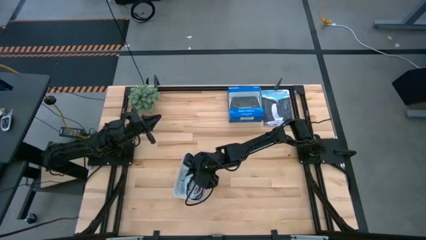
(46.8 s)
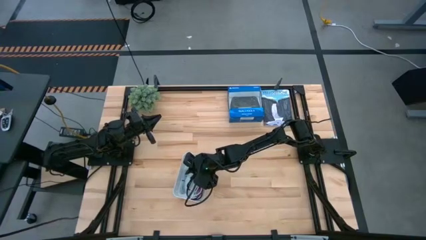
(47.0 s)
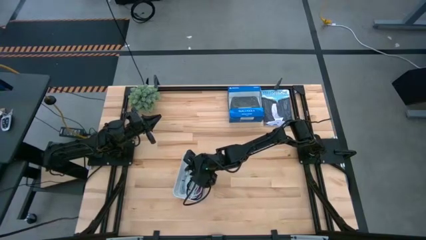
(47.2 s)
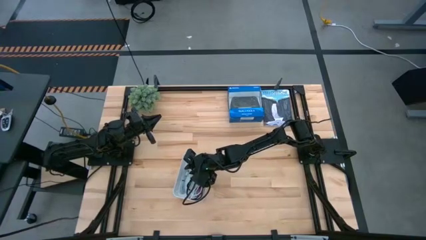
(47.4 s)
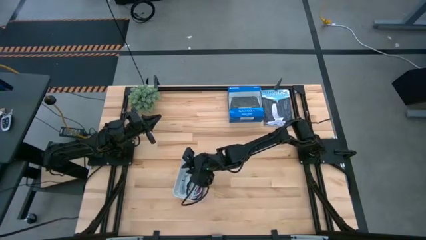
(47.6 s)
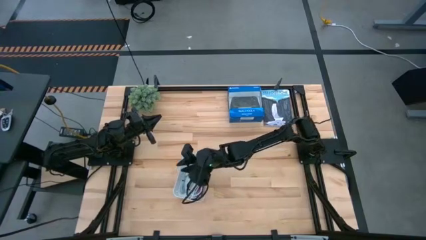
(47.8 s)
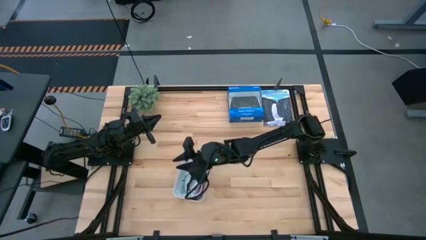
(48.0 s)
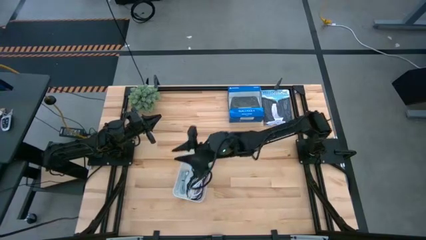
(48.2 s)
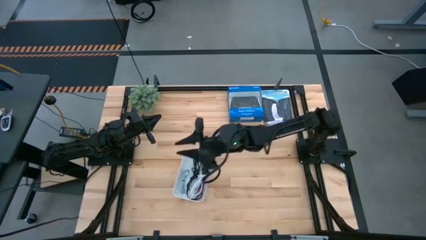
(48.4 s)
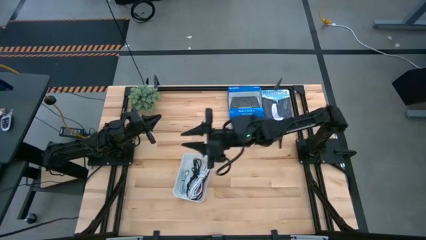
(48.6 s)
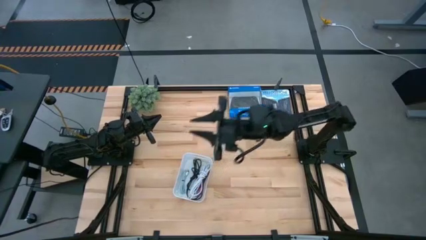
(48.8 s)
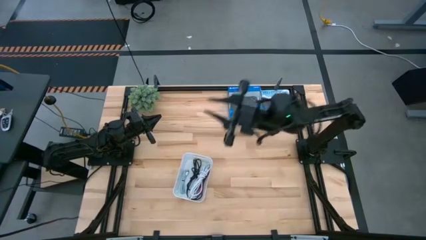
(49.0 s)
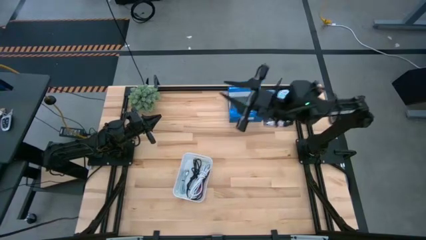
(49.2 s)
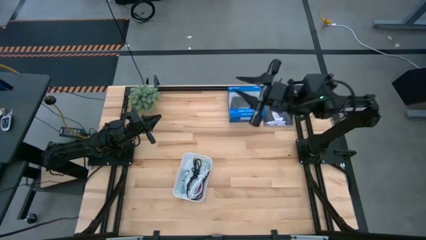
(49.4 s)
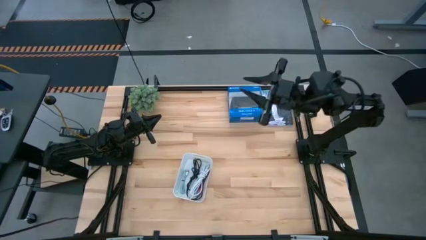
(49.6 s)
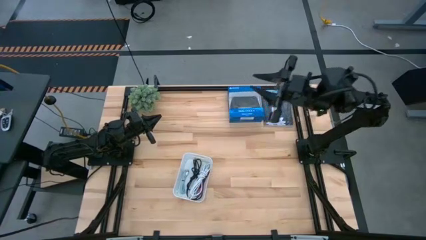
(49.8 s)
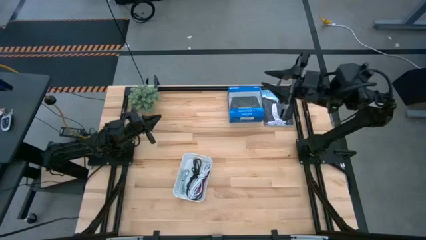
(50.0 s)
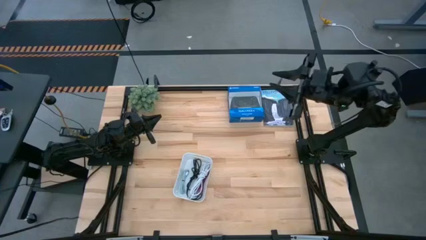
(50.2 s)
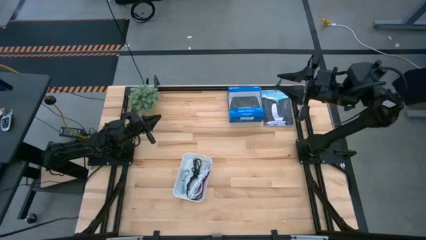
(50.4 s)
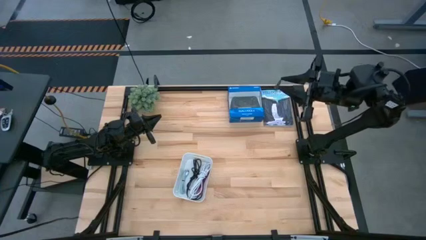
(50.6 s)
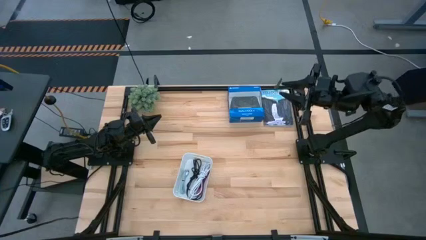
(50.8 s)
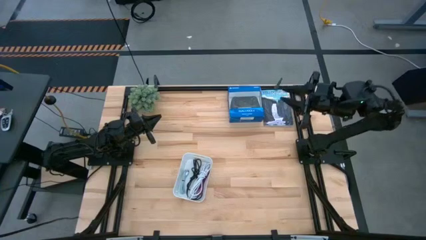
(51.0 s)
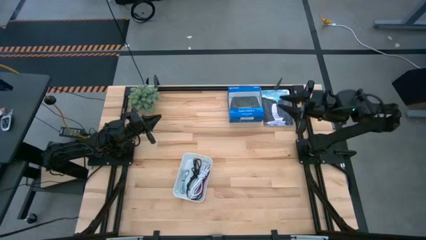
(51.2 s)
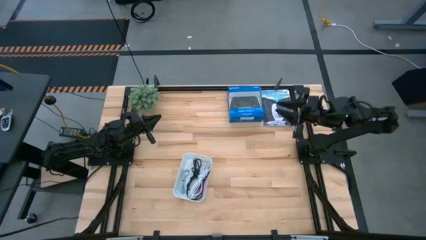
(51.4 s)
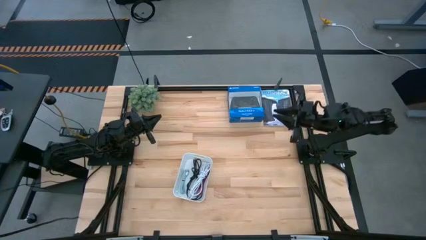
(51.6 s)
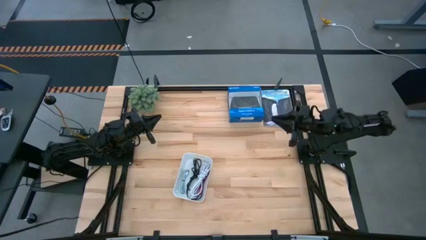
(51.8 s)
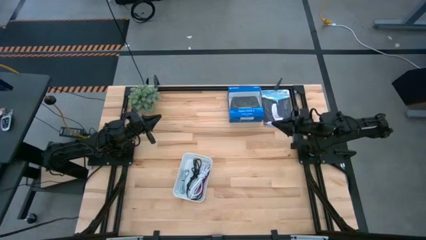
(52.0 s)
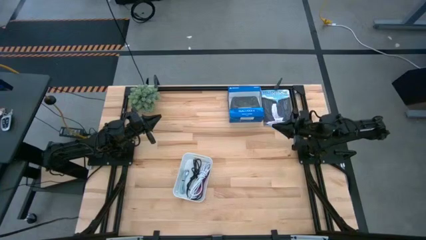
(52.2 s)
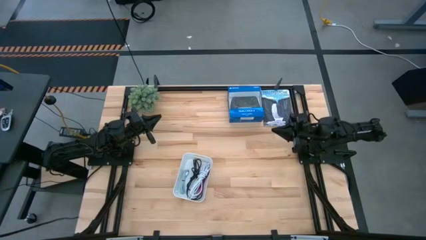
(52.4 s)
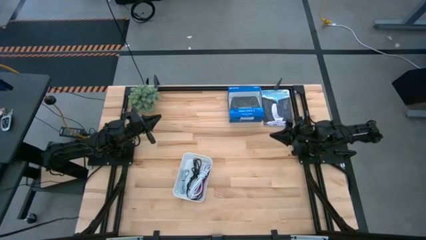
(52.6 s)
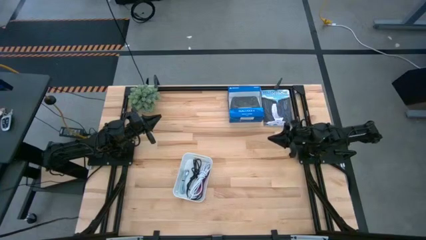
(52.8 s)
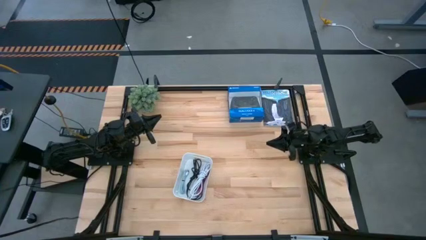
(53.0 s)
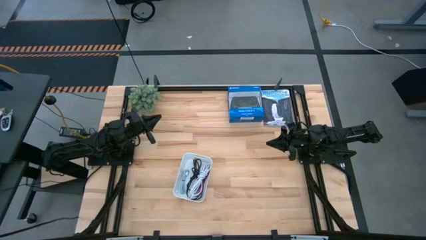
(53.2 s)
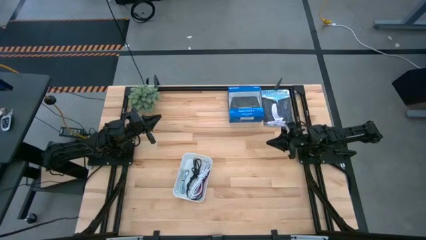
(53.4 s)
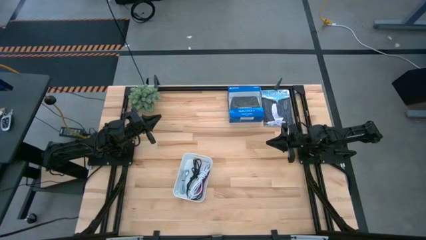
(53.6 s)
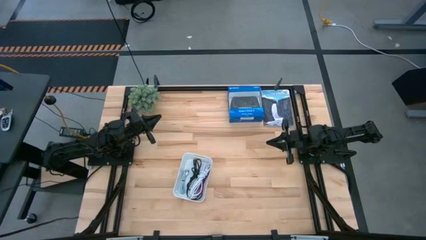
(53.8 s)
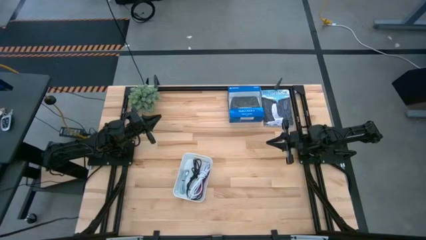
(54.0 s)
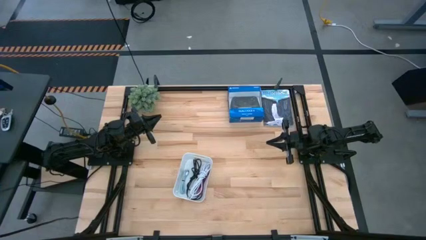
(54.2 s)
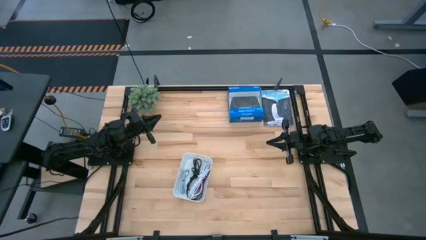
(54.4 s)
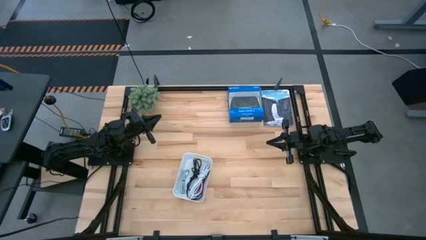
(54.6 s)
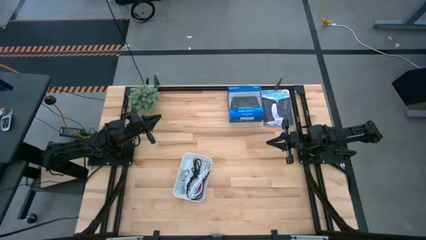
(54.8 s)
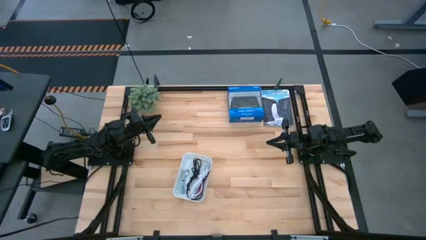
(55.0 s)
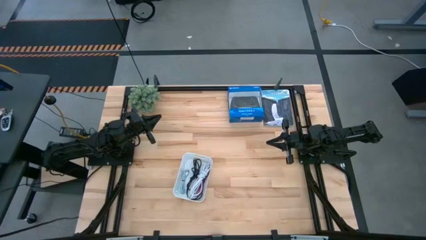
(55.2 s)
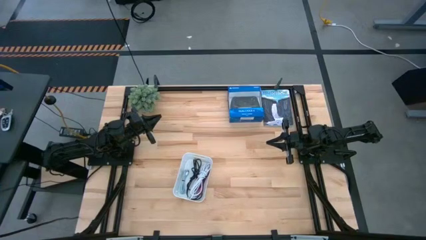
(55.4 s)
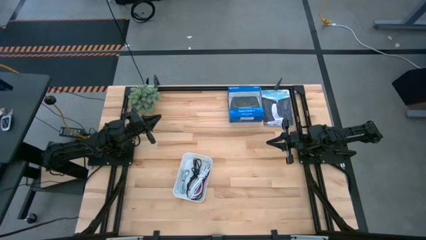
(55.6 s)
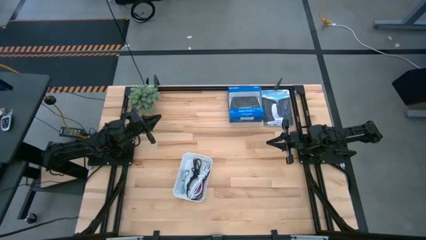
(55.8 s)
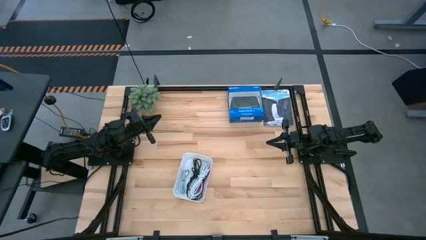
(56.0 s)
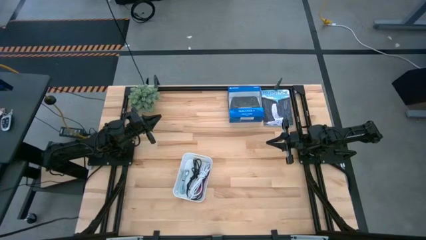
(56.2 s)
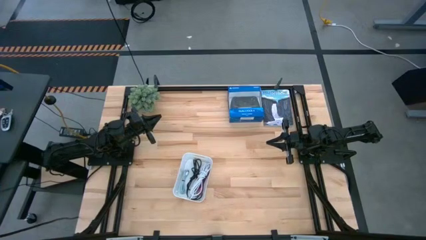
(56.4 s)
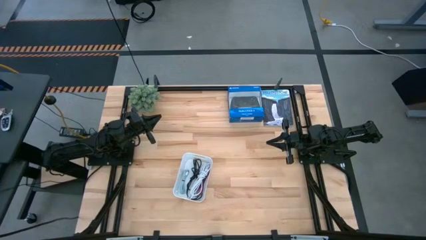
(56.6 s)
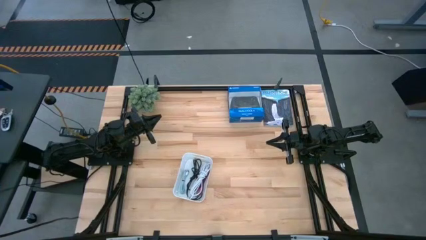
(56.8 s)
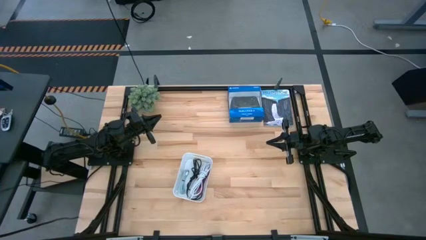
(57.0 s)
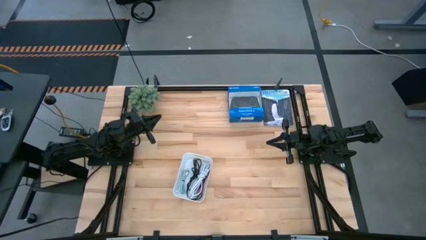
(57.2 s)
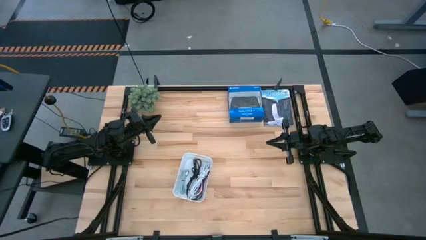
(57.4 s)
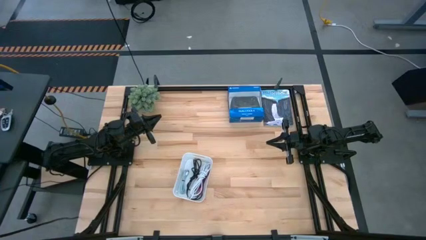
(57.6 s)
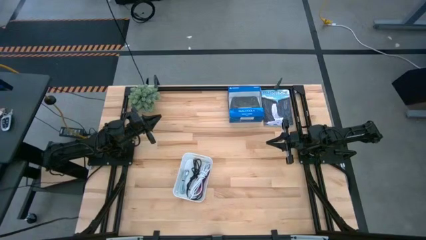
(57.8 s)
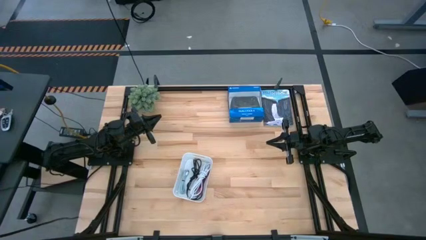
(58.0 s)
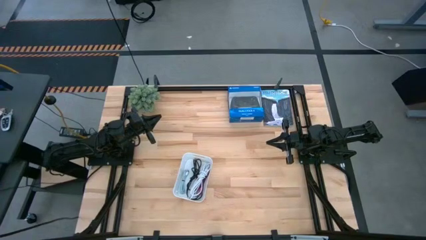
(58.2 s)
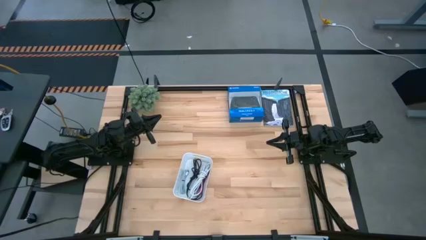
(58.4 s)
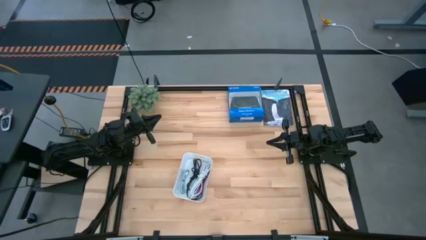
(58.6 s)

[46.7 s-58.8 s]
Task: Pick and place USB-C Cables
Return to Home Position

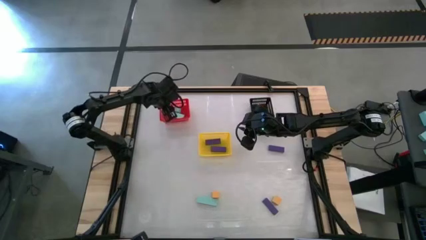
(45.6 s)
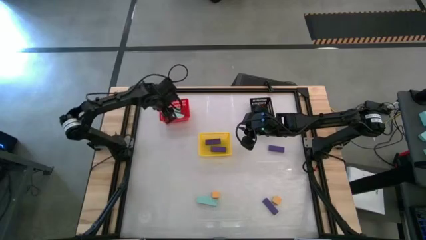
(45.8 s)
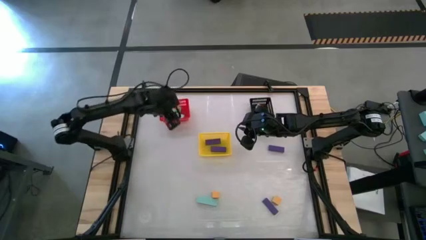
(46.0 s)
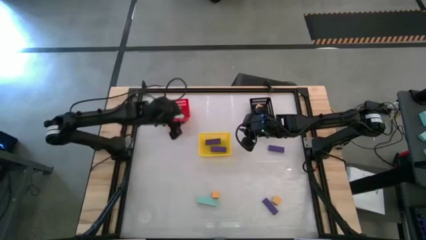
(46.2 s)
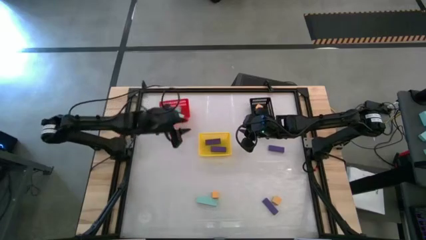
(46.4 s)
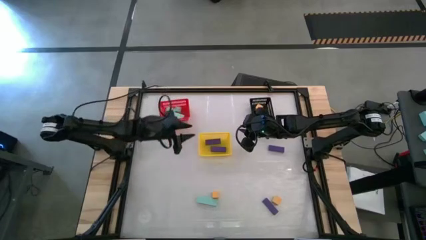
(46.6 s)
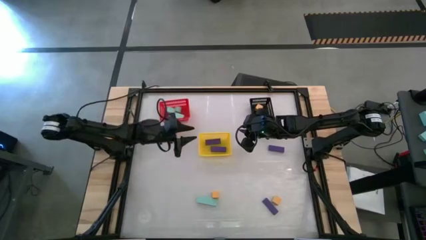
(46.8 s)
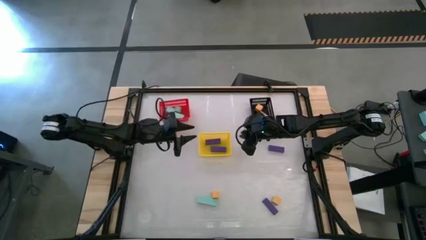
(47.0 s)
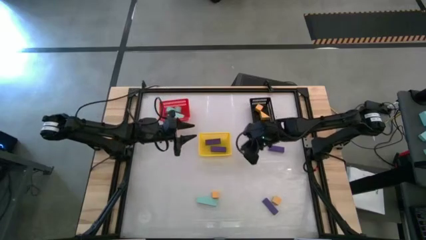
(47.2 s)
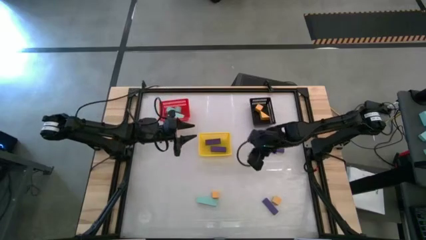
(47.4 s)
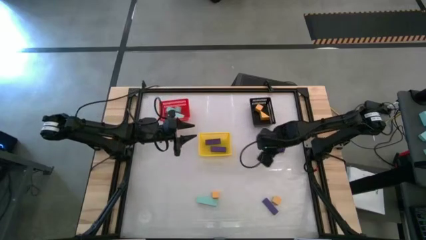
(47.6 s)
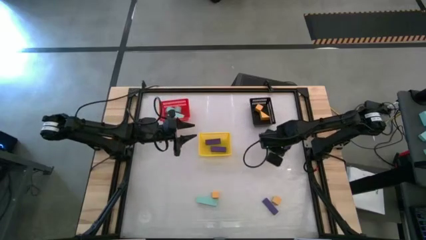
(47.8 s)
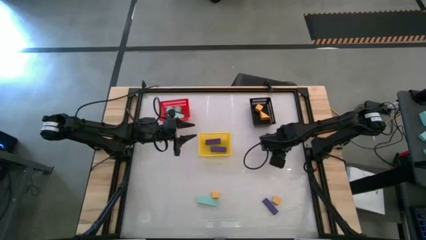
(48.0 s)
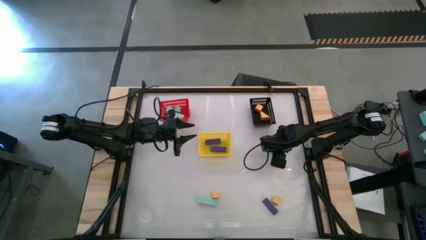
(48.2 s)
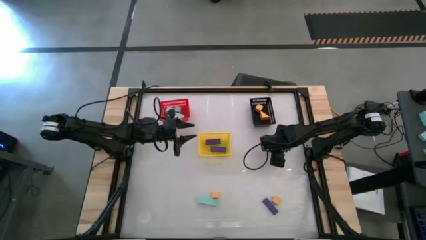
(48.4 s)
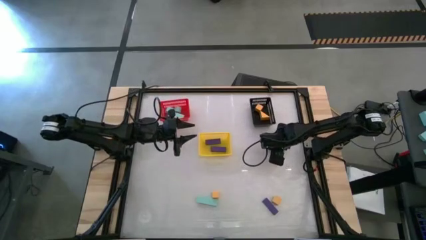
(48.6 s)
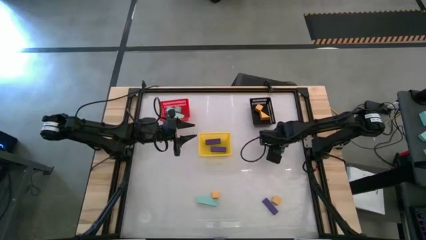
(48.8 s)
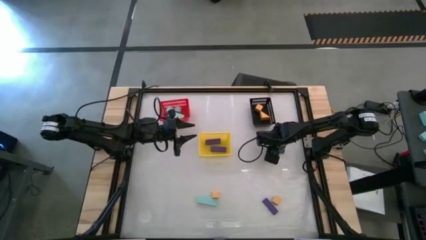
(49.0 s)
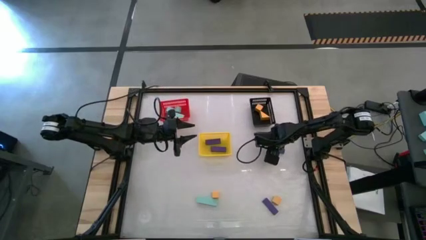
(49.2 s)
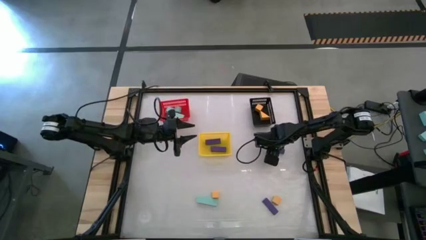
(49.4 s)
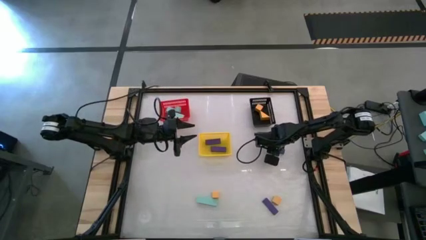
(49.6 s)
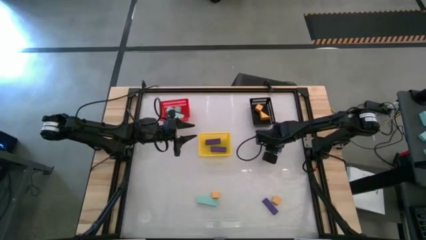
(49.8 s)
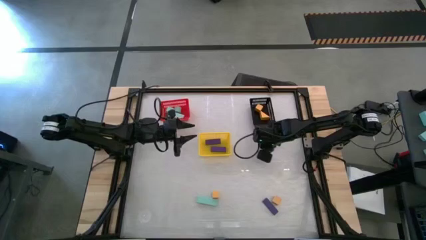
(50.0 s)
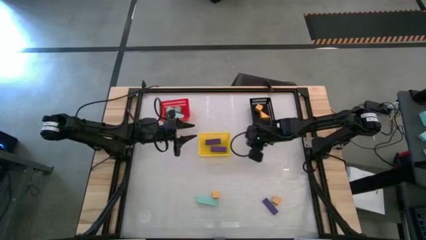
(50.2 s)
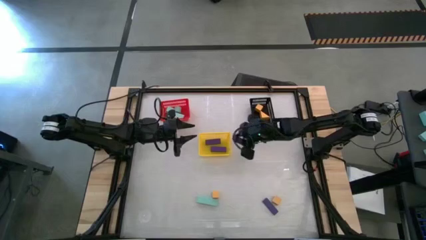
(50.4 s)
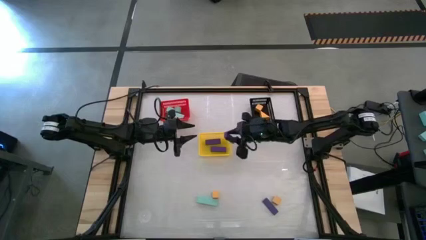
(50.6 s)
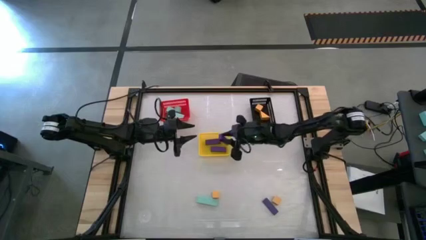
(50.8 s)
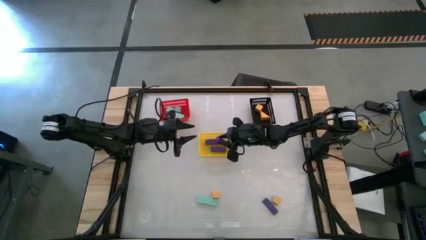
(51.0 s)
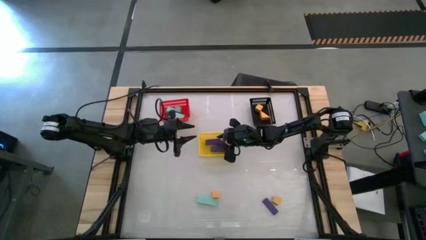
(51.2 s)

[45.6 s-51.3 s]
Task: Sort & place blocks by color
Put the violet block into the yellow bin
